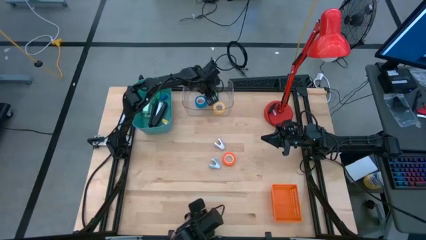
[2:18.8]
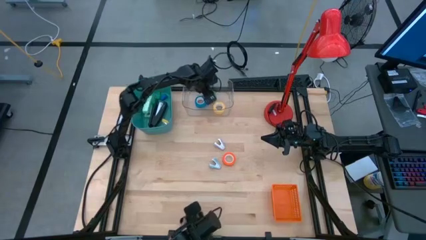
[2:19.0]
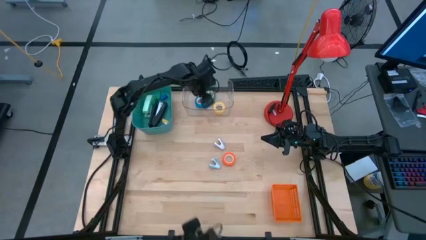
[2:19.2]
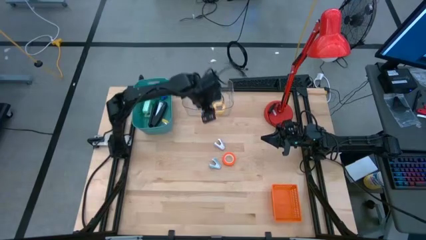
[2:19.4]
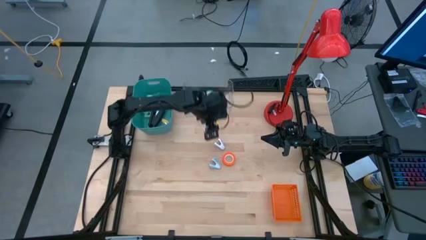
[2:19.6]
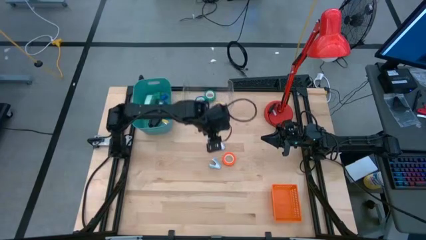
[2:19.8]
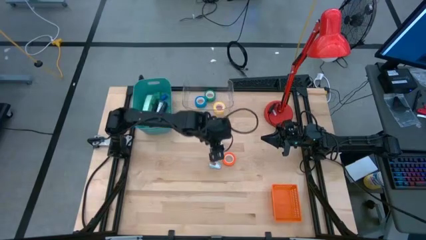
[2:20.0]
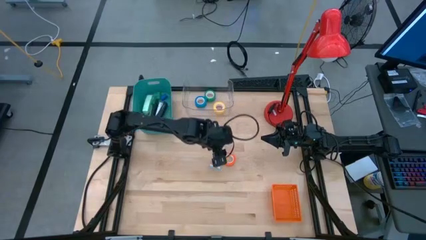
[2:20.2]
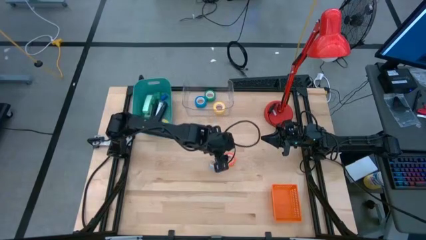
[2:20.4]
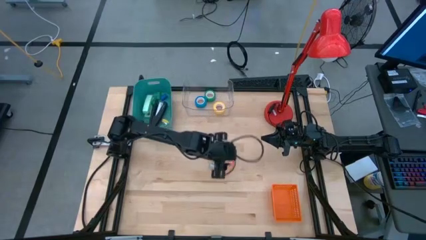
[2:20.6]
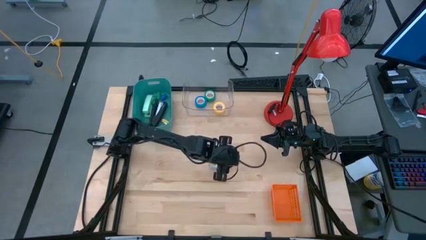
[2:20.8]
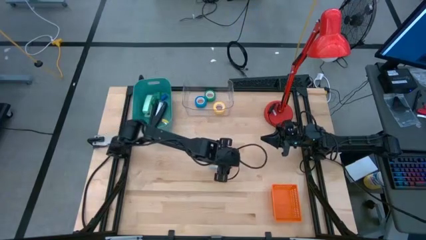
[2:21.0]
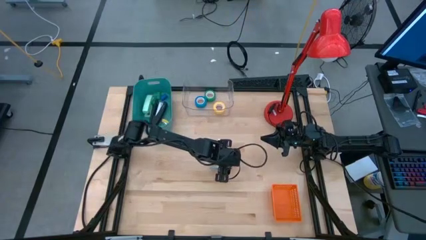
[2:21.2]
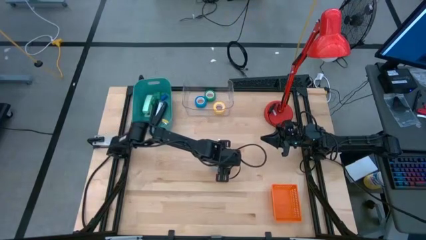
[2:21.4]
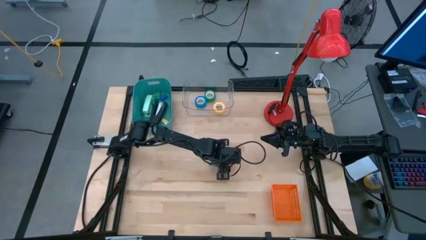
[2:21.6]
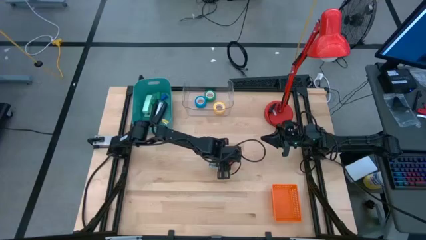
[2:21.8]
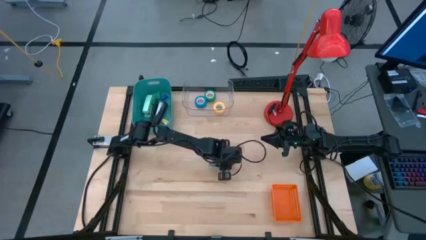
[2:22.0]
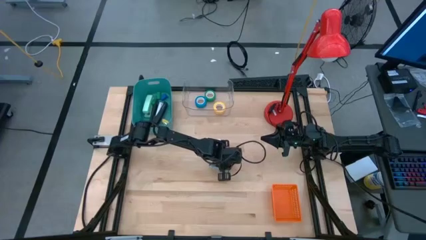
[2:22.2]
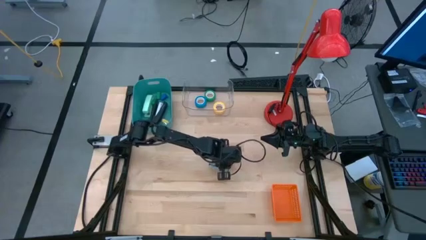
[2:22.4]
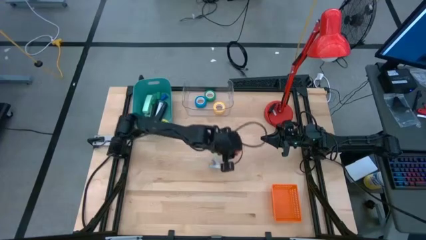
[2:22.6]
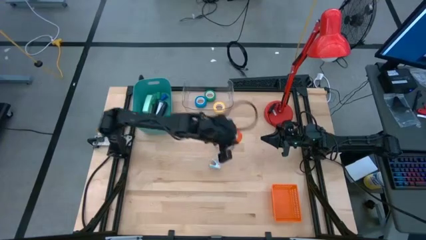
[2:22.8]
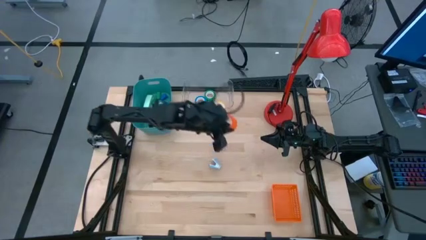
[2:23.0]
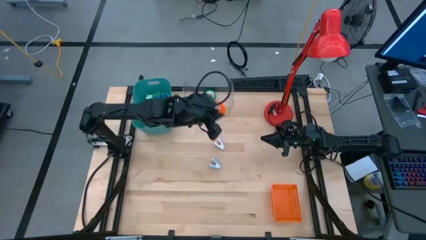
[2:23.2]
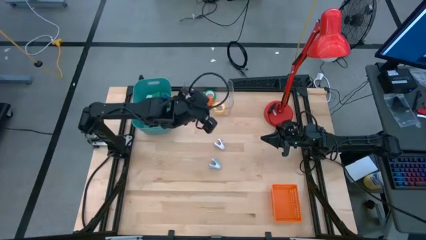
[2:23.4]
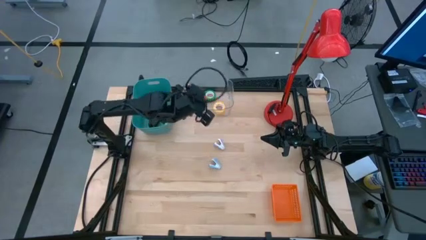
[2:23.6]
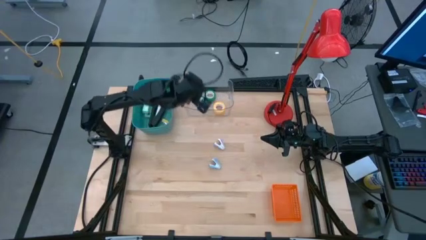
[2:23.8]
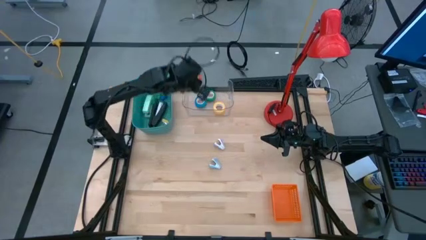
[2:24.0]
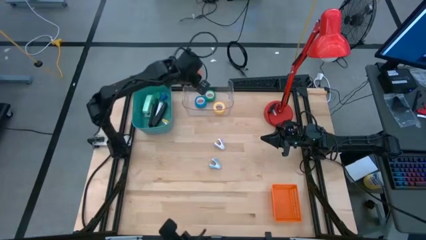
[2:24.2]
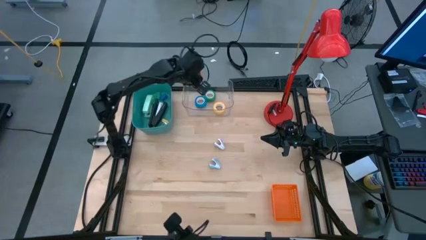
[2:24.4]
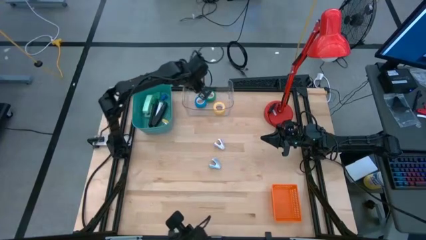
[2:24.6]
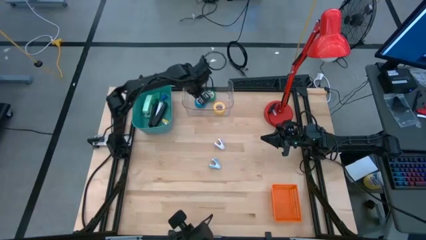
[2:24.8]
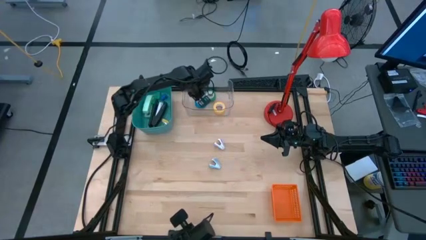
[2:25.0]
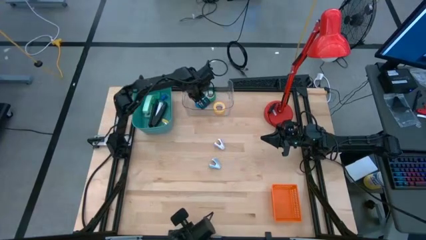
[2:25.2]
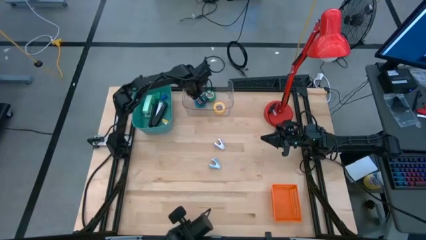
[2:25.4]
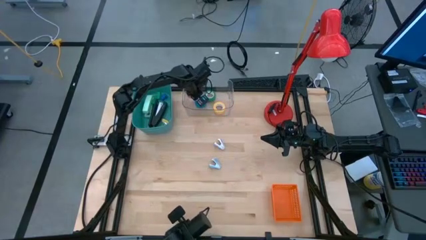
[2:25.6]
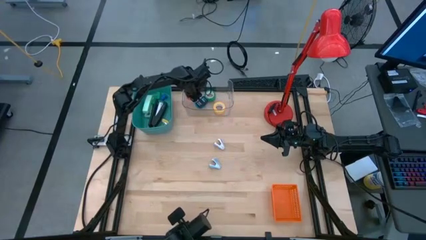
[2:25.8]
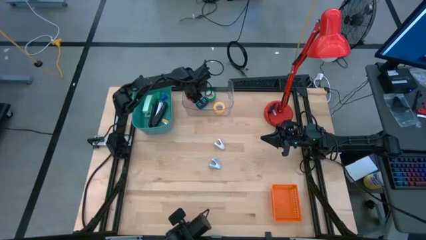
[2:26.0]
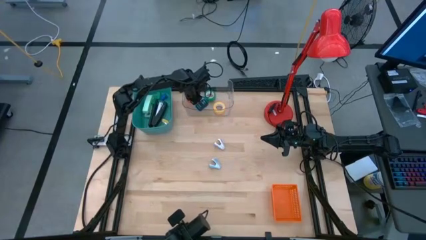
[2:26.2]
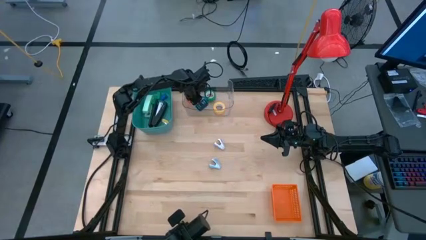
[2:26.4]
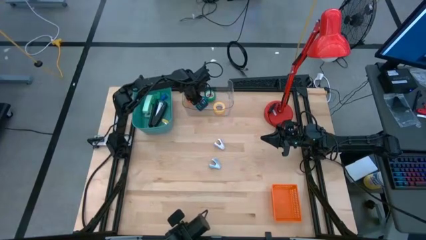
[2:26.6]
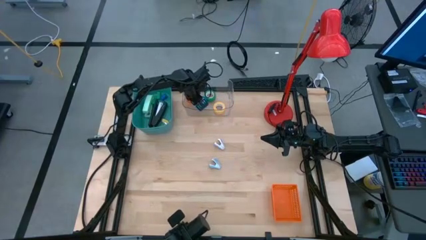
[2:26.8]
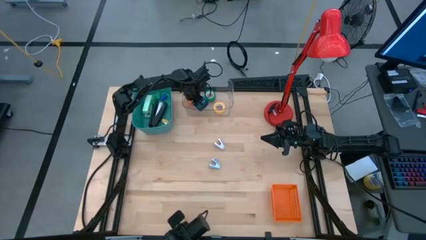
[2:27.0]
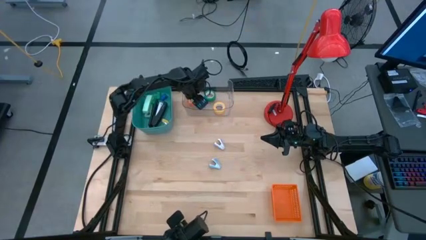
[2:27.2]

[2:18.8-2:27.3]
Task: Pick and place Stapler, Stapler remover, tape
Put the orange tape into the transparent bin

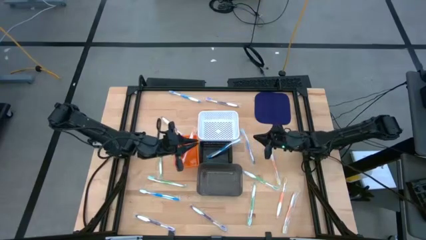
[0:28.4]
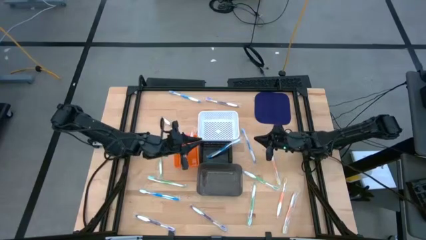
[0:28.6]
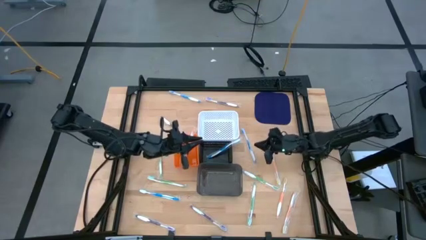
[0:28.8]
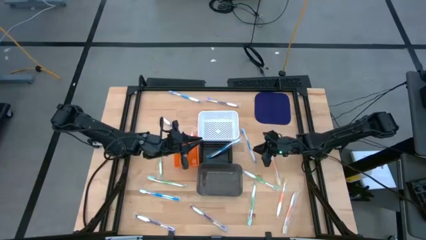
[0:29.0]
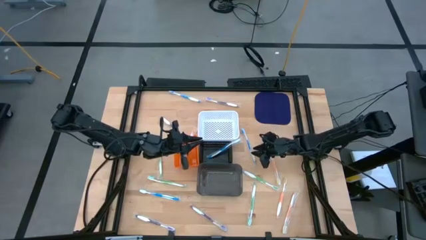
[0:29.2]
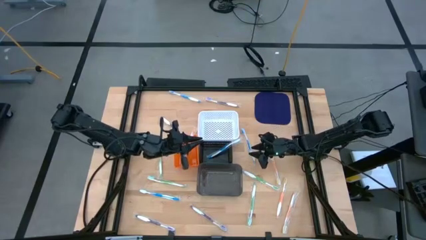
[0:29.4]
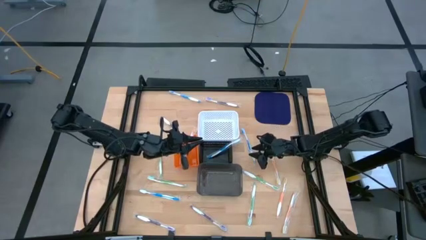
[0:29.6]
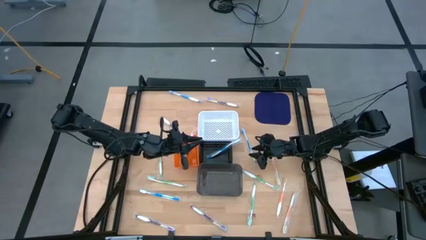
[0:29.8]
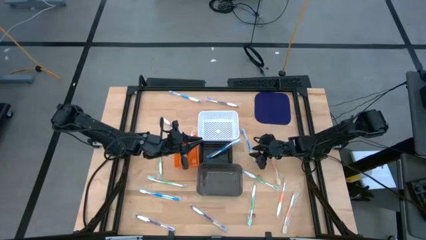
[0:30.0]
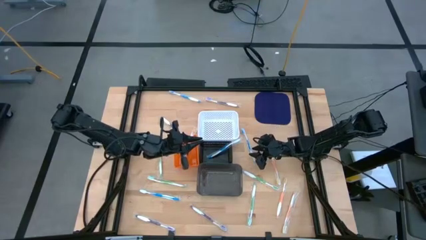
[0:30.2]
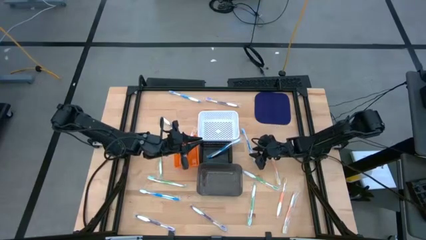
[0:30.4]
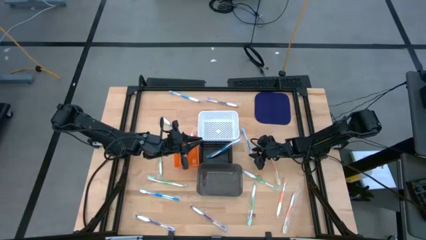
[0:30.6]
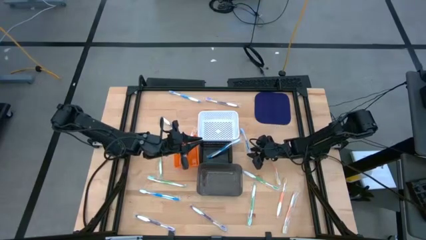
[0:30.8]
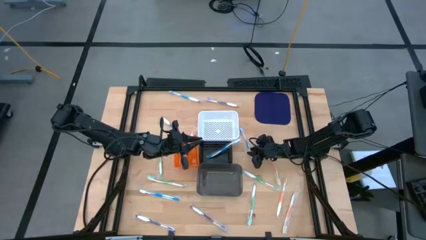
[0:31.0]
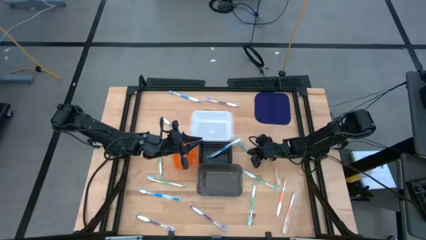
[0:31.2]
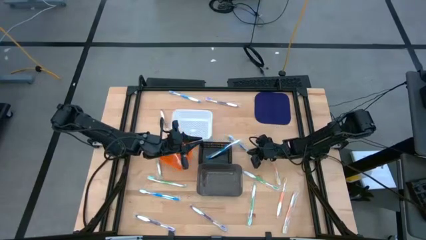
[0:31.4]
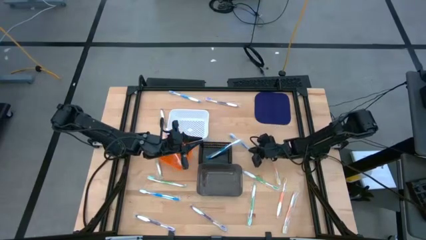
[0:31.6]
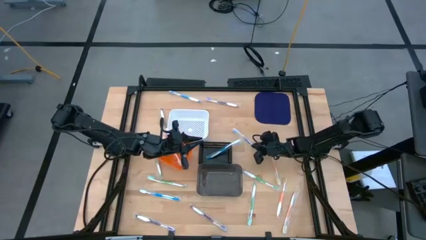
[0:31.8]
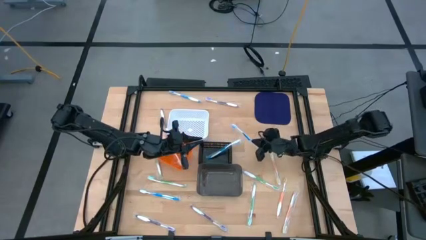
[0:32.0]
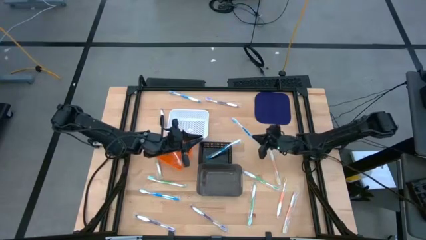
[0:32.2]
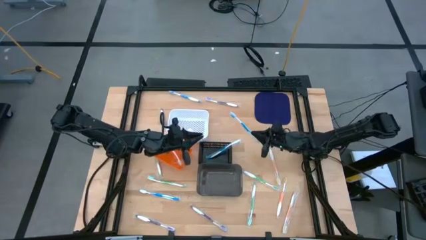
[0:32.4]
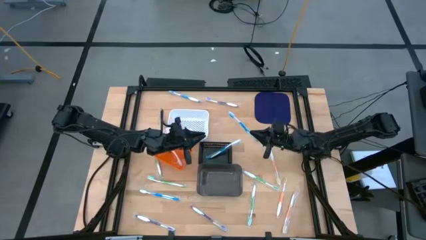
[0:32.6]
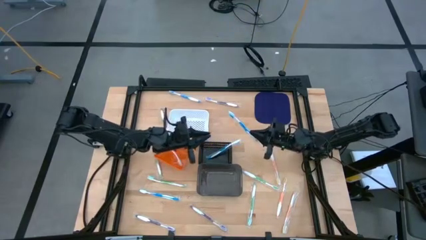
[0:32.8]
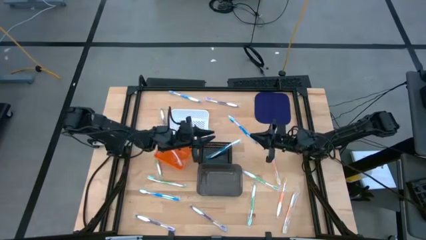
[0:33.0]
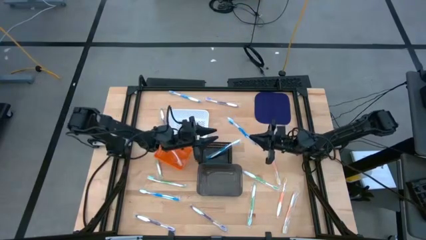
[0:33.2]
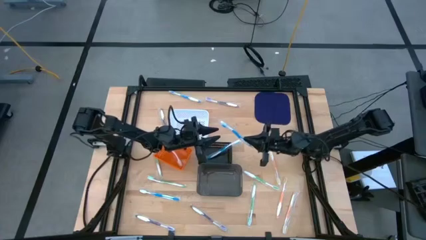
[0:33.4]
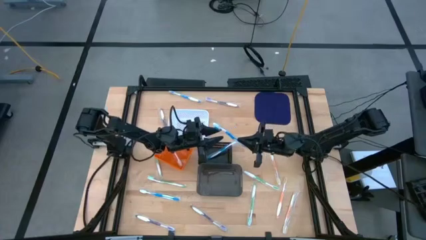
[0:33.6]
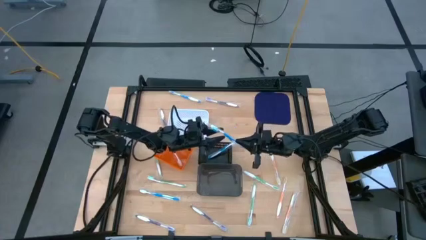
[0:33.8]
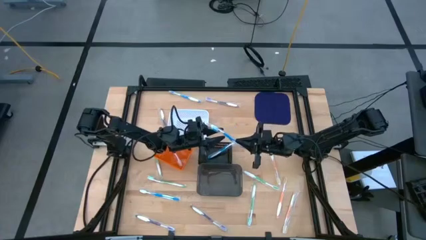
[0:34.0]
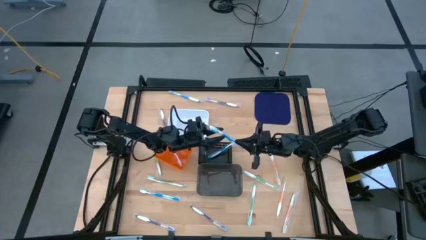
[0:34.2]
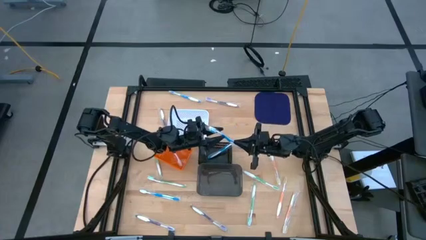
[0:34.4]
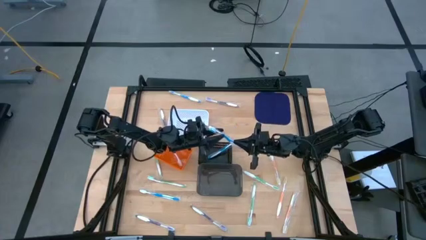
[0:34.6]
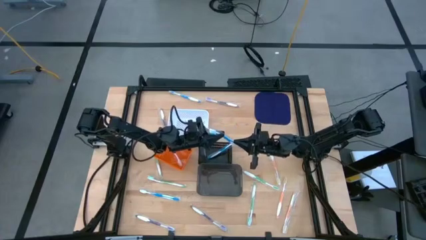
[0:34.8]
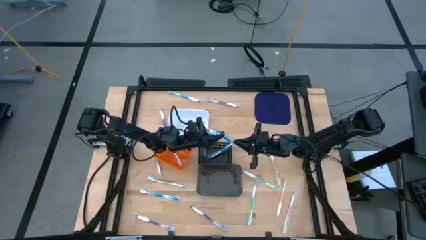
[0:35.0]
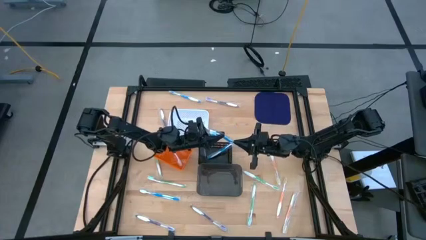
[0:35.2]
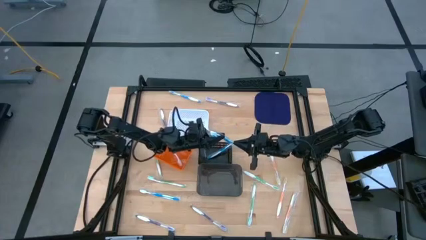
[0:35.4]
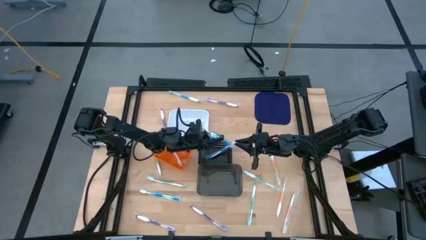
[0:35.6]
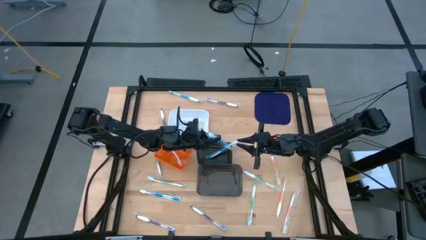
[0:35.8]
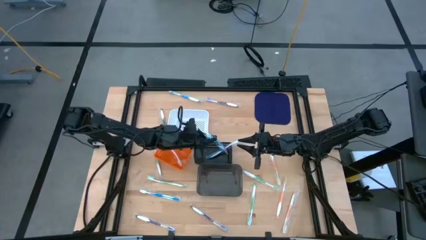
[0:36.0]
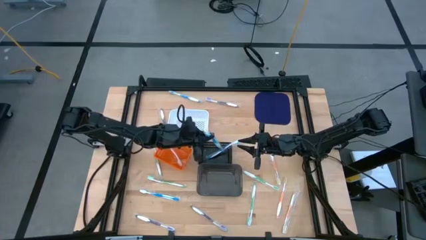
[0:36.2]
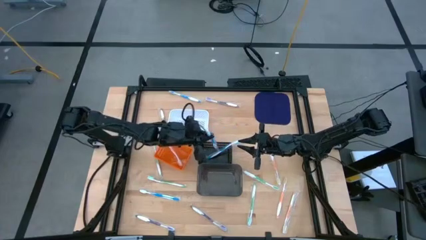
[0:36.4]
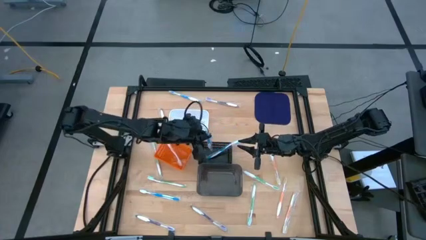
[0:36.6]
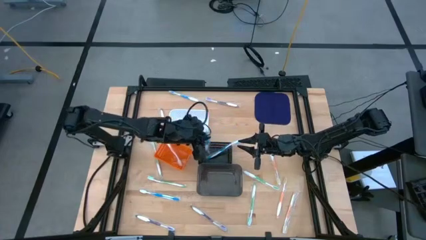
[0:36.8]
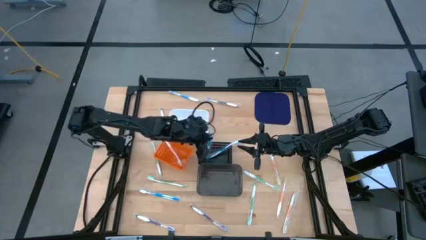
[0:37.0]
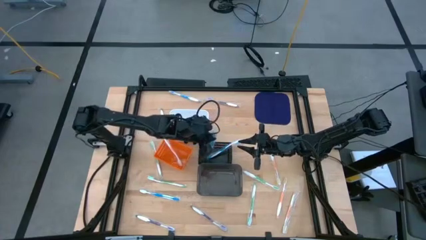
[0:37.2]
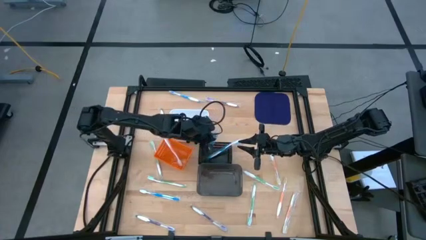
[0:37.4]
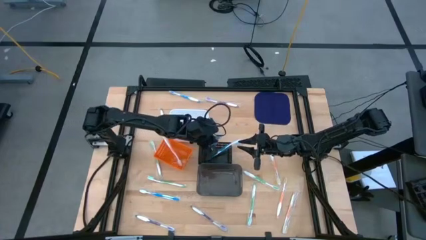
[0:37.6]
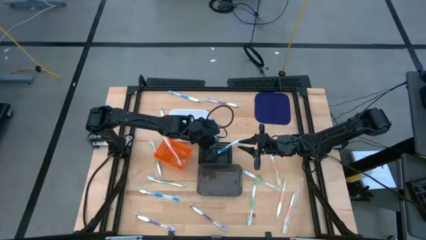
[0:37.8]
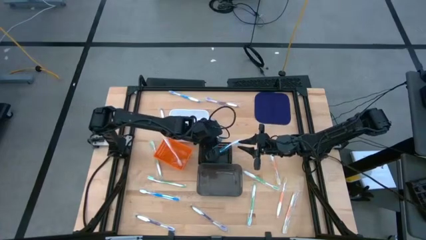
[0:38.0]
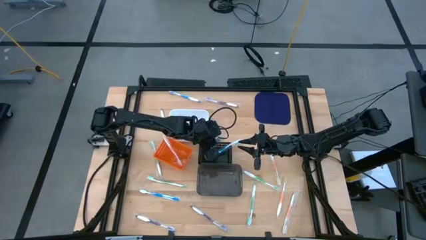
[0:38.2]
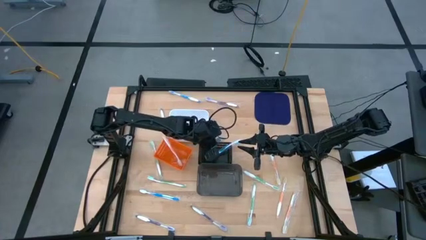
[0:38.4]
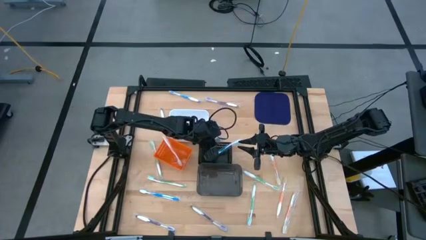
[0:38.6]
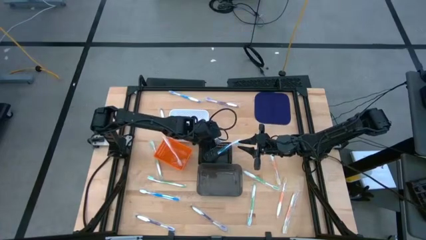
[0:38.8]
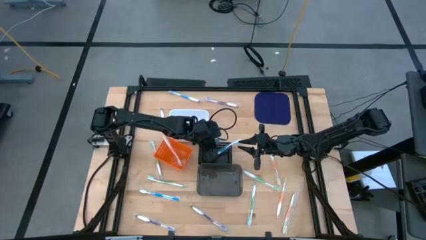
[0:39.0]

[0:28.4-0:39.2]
Task: Pick & Place Toothbrushes
Put the middle right blue toothbrush into the black basket
